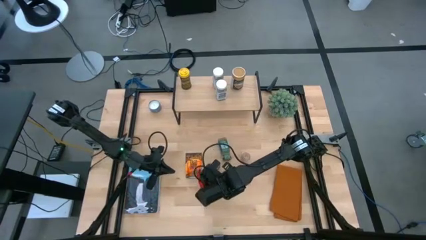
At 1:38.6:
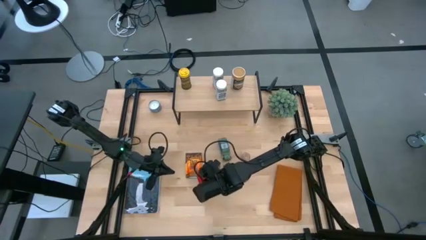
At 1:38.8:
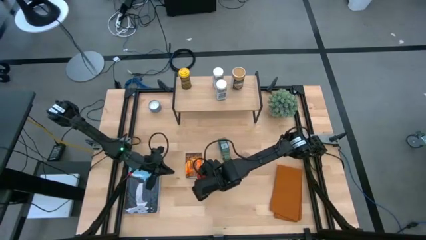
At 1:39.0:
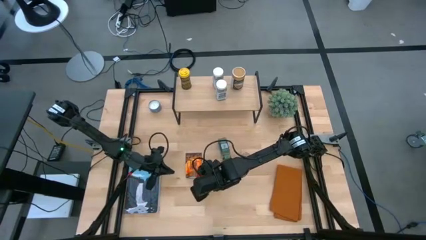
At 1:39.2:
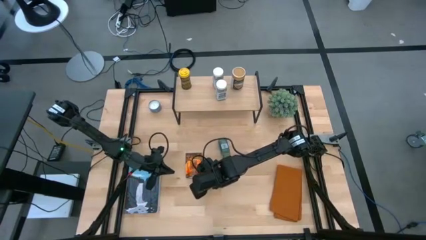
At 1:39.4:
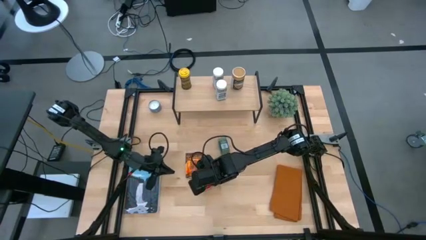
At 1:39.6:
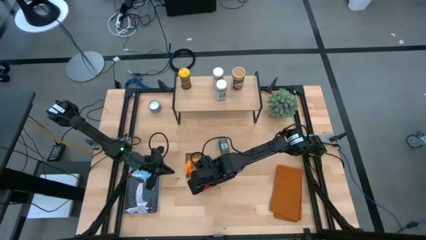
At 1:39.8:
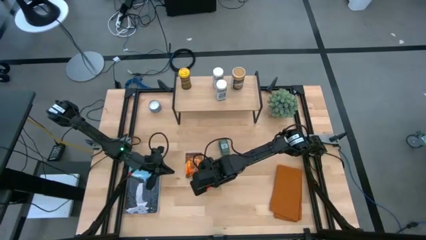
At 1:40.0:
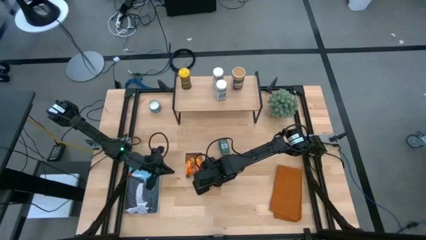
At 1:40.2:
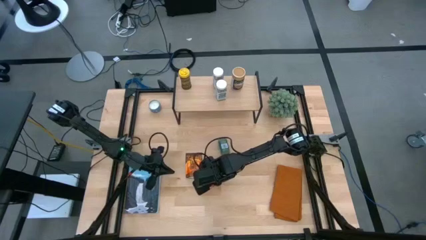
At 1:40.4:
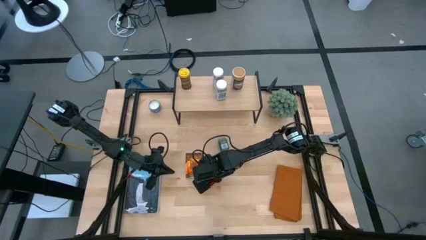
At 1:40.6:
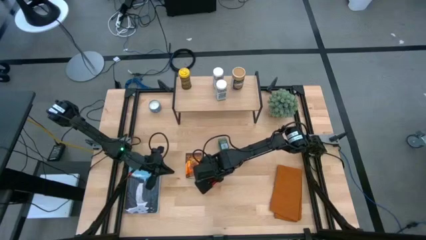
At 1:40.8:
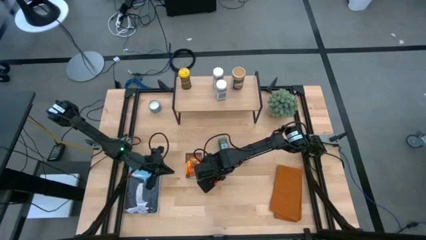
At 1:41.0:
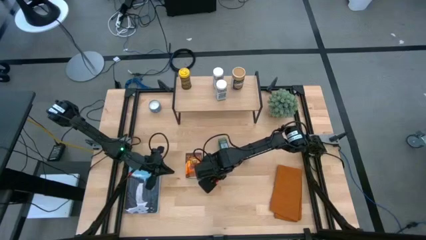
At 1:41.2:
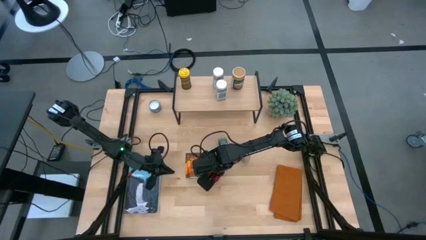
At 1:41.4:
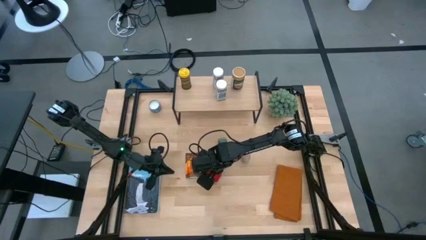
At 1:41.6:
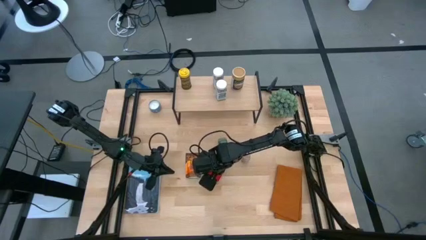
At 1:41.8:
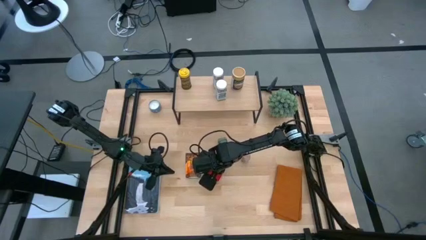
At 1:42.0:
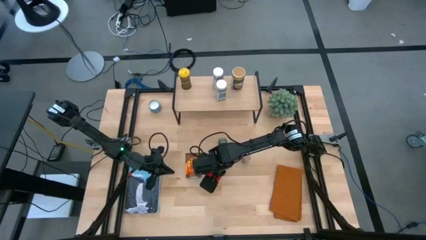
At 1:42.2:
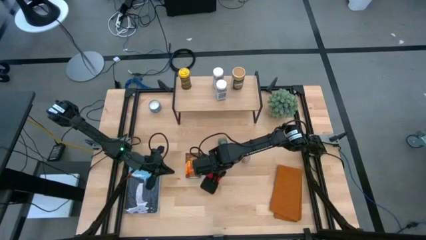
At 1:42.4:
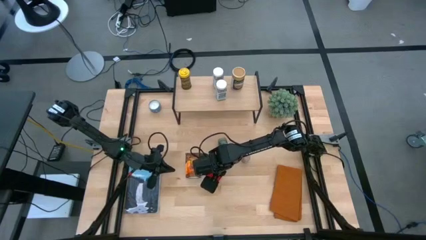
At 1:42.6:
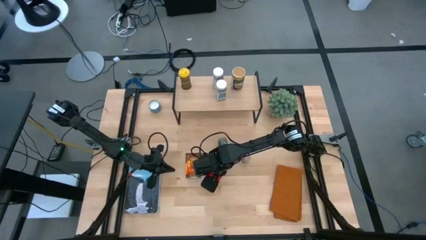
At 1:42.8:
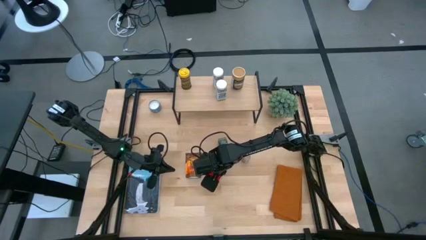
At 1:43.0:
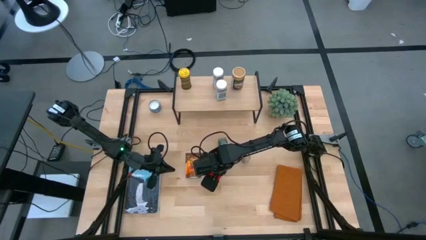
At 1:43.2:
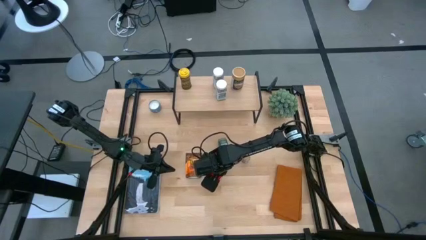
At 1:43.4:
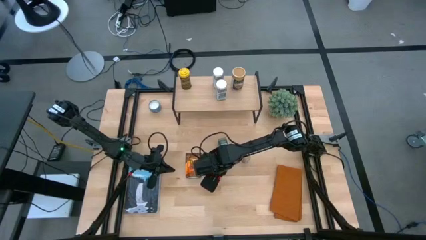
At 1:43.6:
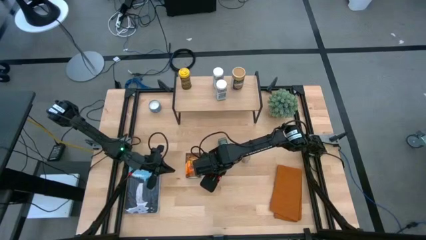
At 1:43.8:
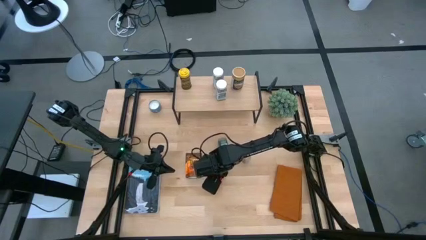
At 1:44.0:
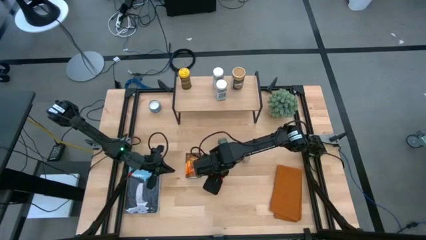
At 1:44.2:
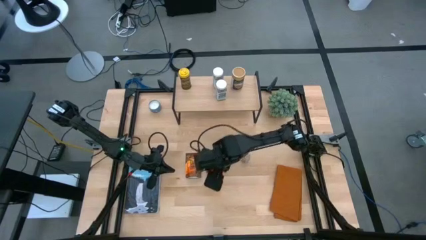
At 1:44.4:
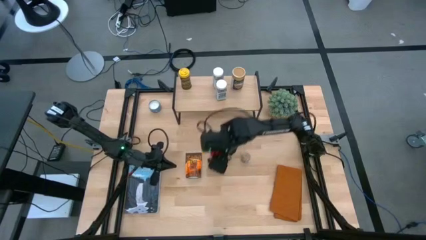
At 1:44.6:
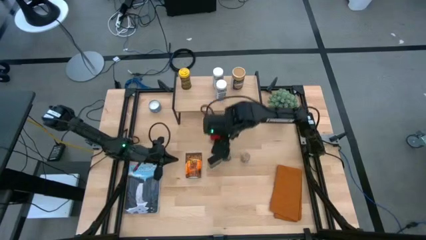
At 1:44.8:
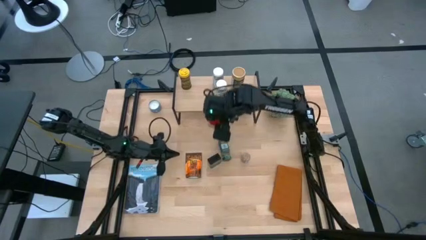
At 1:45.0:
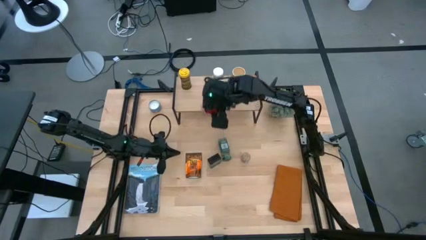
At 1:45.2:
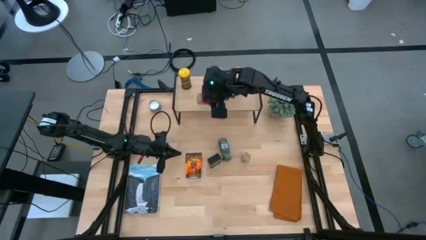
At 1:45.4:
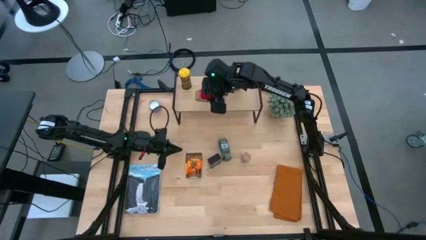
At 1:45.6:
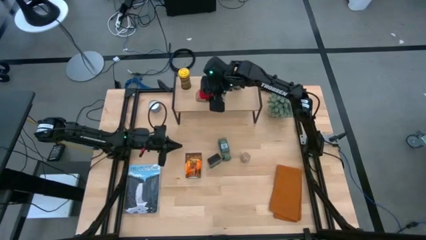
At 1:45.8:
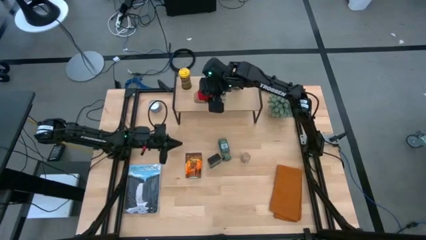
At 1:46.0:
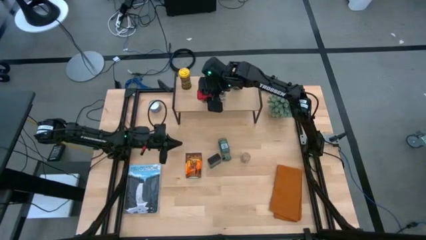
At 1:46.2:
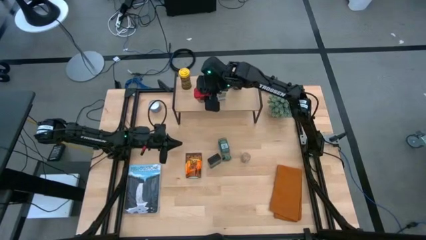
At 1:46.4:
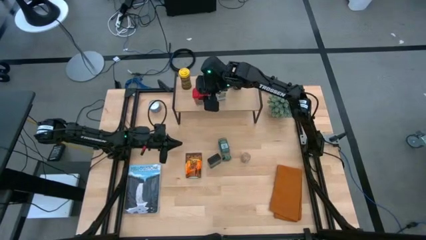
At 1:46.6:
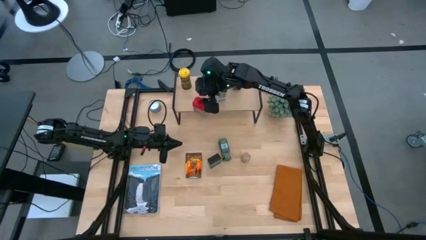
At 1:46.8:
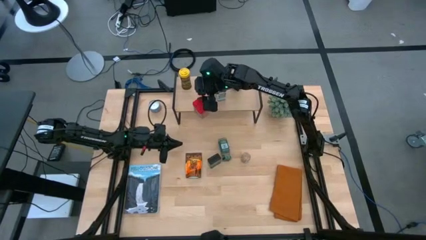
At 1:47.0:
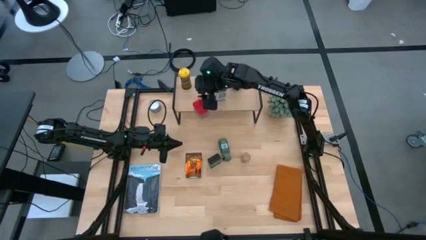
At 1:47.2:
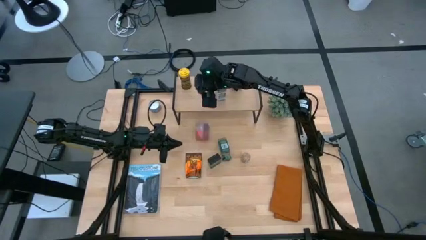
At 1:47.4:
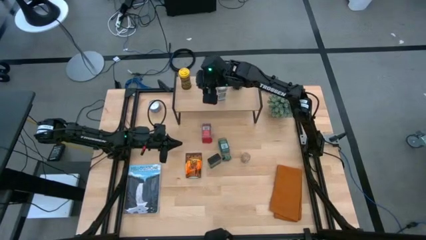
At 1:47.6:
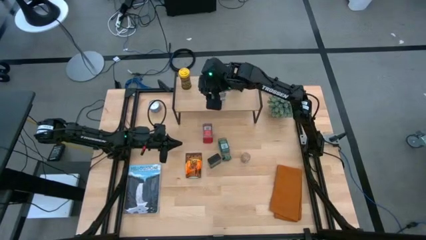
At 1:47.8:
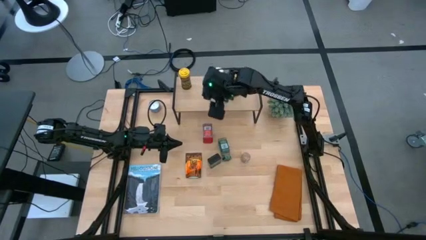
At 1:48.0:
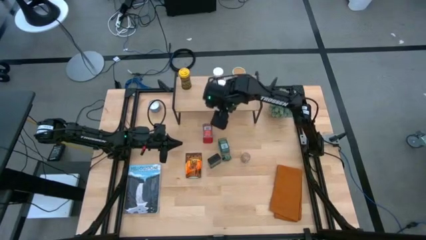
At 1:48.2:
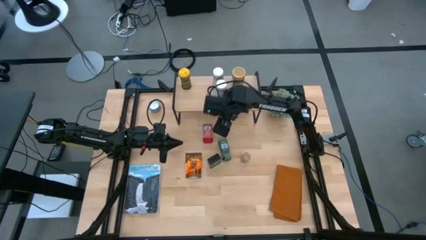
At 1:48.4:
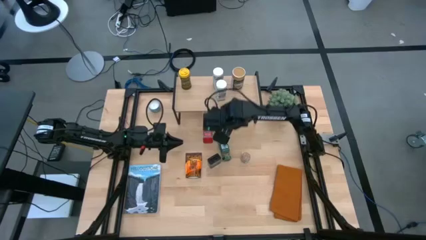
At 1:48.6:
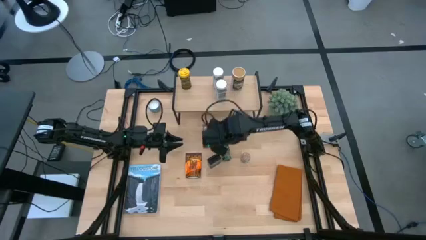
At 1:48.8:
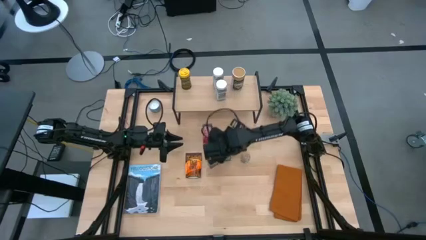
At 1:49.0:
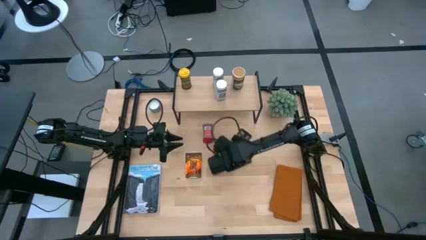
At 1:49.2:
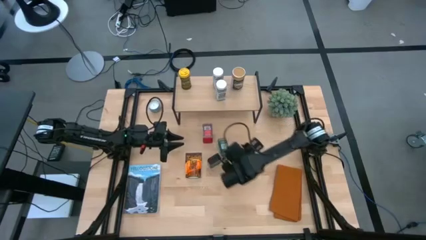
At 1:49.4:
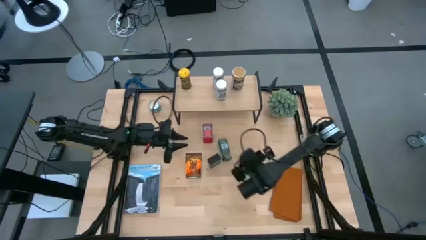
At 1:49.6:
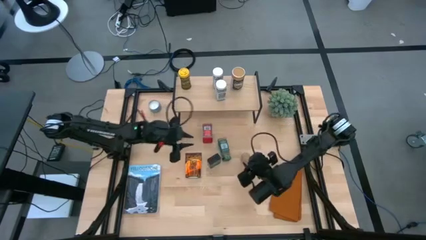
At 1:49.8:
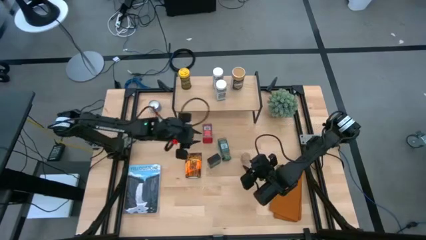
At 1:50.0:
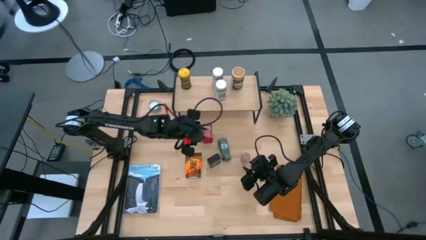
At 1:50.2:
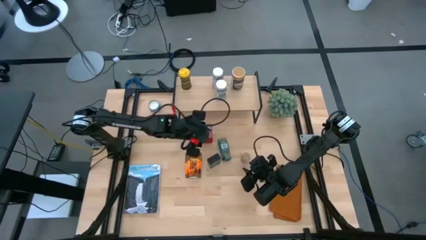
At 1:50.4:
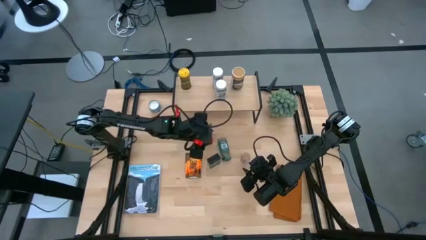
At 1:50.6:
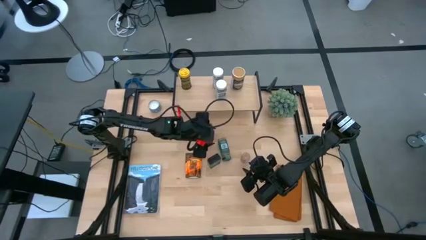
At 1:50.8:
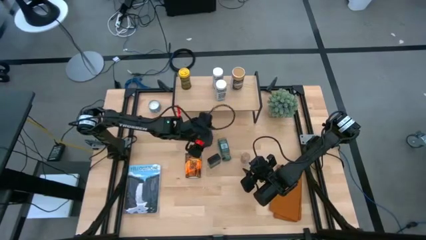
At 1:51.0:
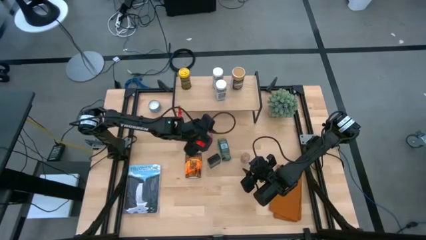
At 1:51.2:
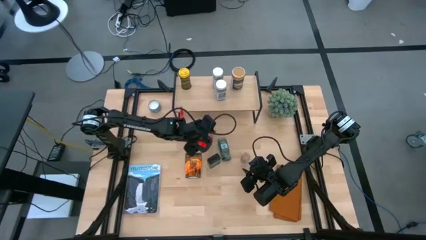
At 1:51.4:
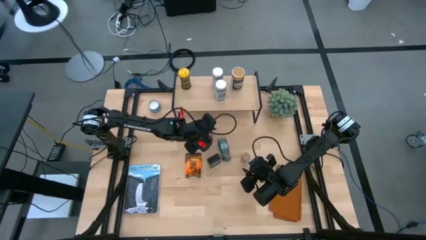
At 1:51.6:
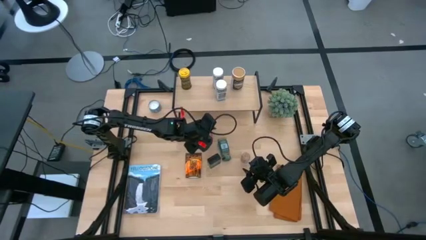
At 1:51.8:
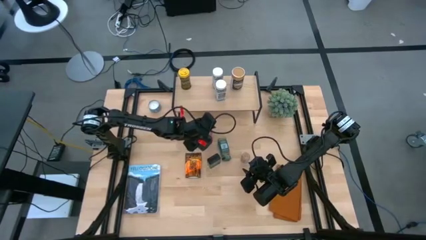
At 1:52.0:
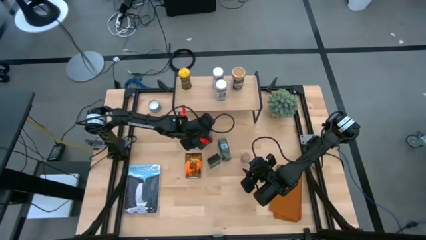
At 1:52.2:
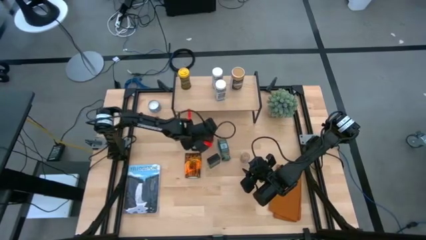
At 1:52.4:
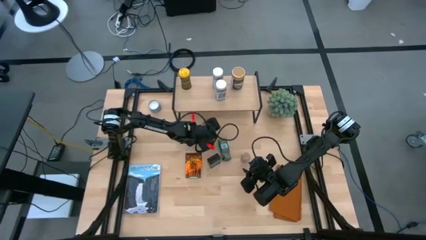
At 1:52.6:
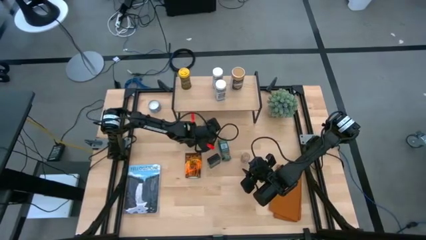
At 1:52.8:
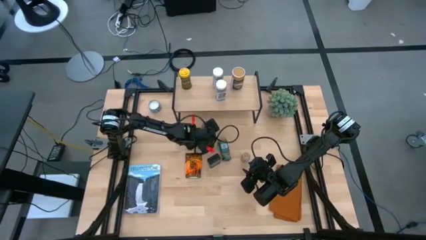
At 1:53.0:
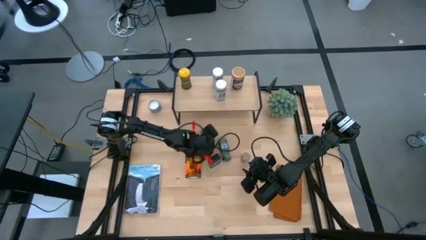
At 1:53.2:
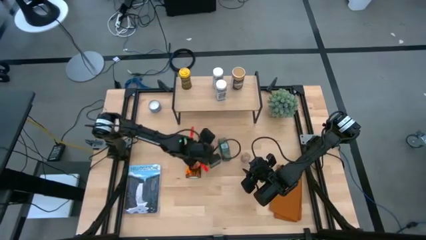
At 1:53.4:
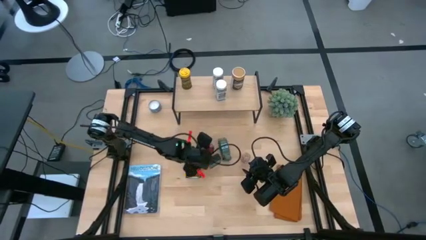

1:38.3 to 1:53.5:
Task: Shelf spices
Put the red can seasoning on the shelf
